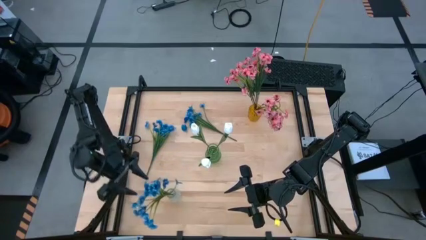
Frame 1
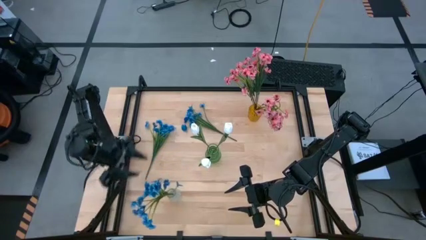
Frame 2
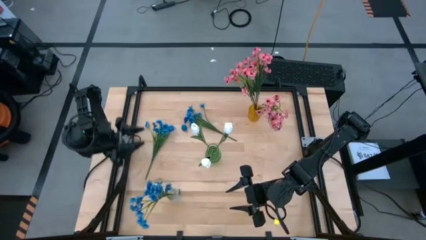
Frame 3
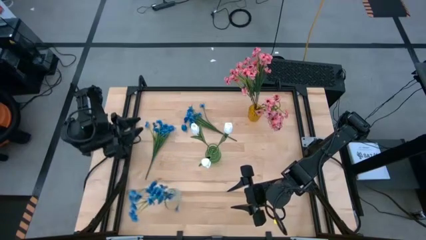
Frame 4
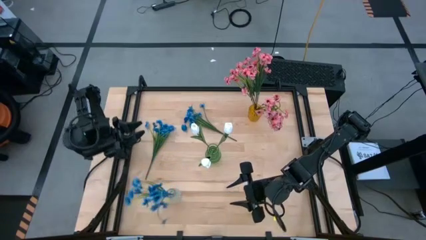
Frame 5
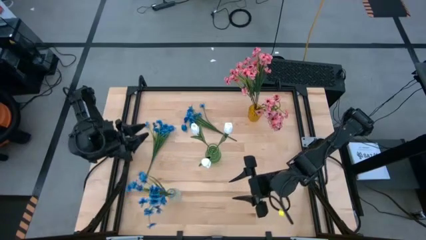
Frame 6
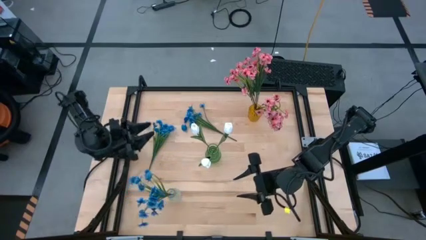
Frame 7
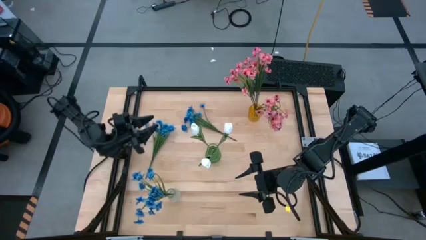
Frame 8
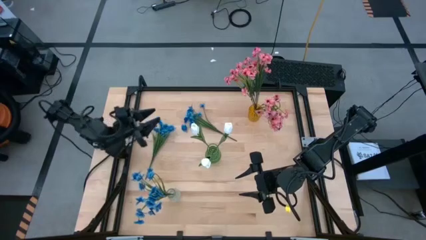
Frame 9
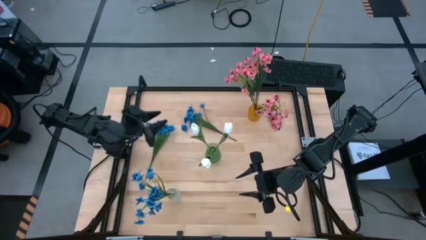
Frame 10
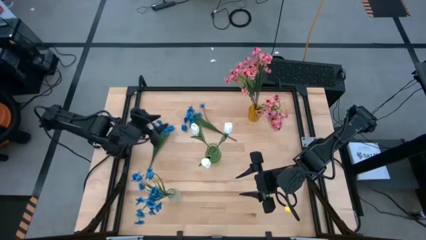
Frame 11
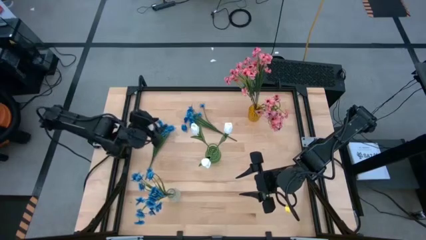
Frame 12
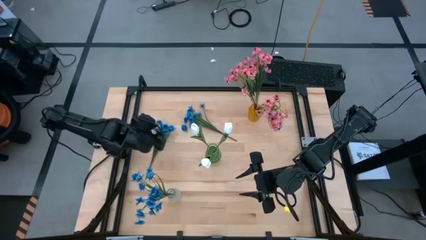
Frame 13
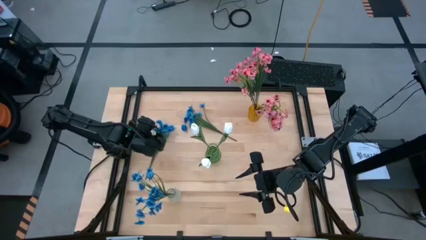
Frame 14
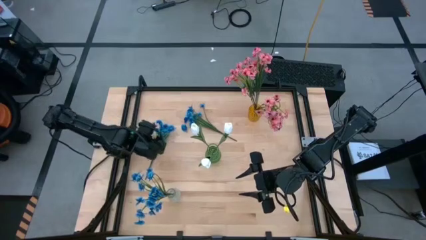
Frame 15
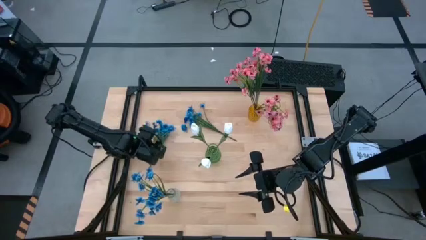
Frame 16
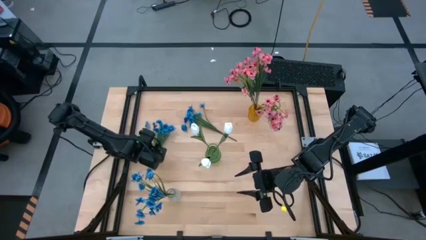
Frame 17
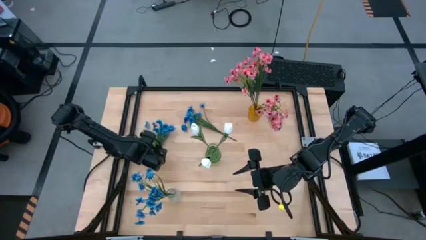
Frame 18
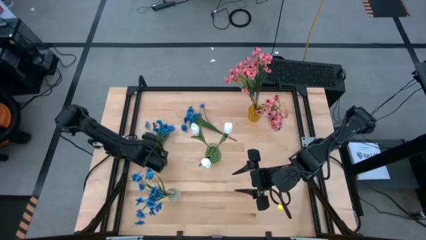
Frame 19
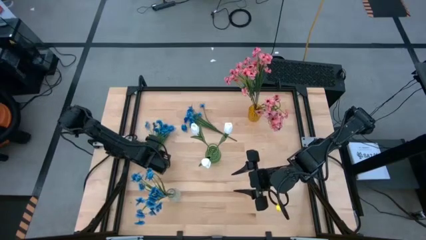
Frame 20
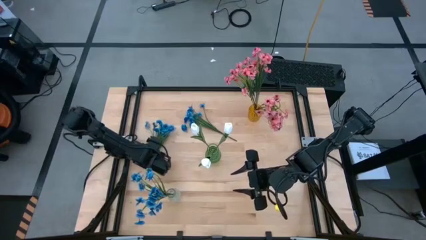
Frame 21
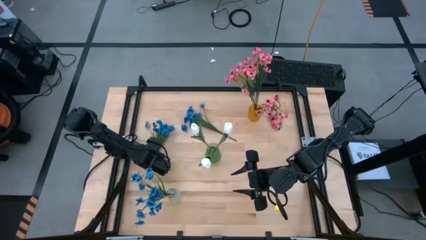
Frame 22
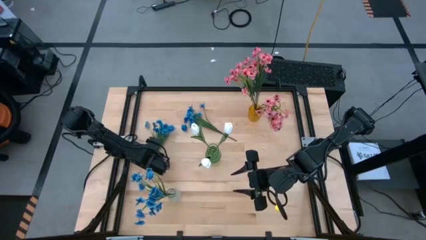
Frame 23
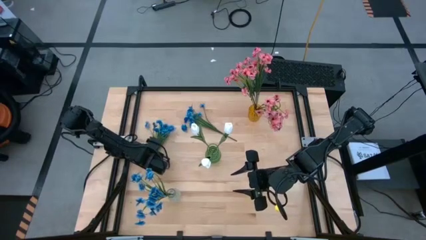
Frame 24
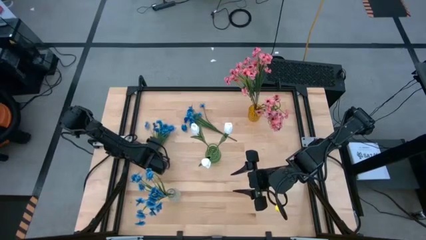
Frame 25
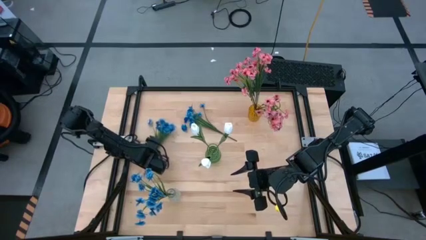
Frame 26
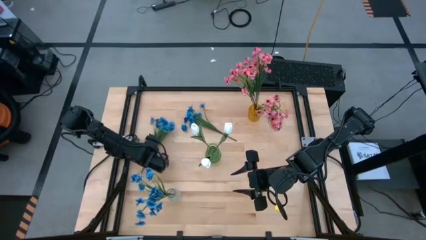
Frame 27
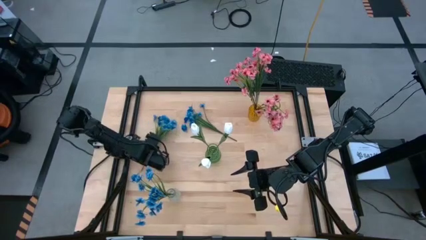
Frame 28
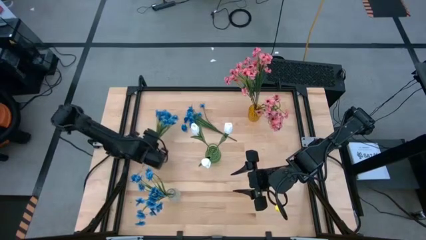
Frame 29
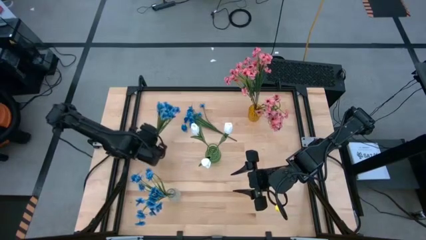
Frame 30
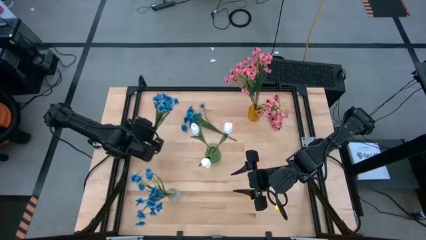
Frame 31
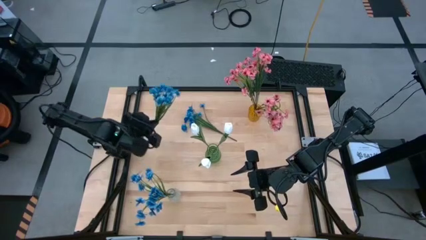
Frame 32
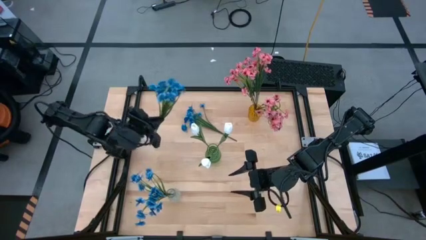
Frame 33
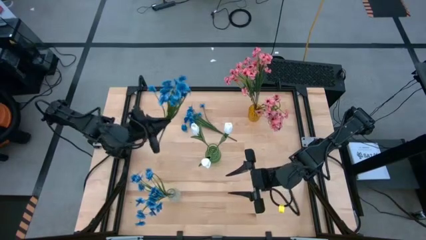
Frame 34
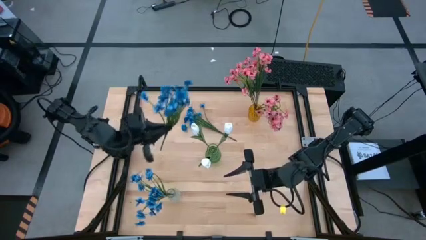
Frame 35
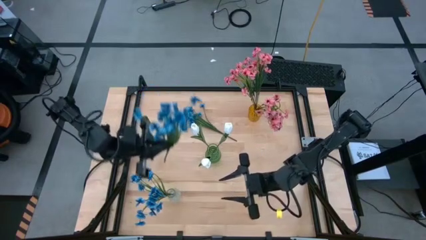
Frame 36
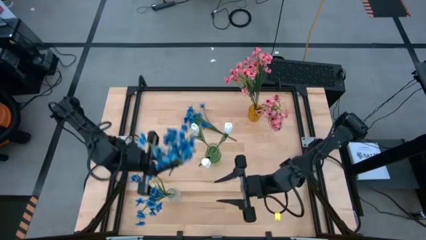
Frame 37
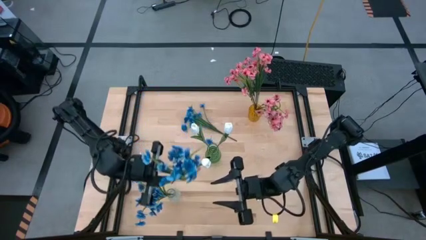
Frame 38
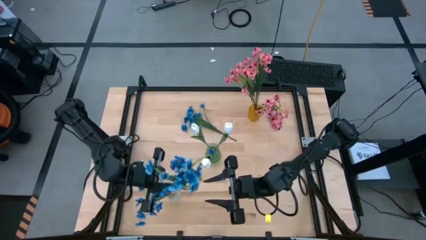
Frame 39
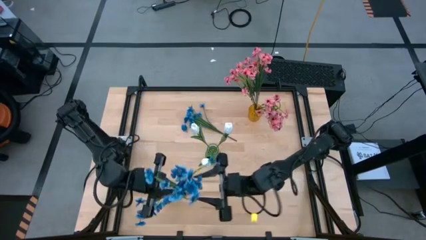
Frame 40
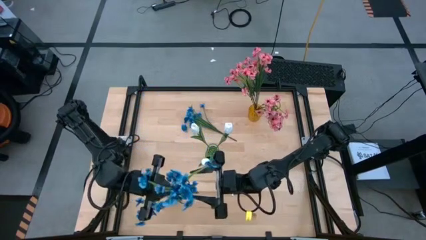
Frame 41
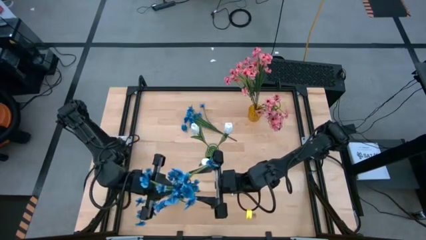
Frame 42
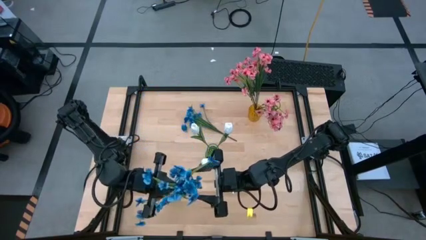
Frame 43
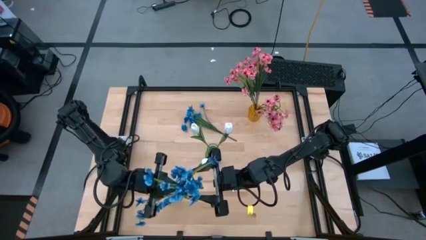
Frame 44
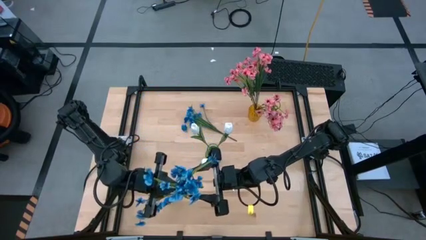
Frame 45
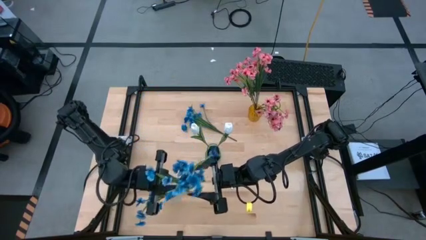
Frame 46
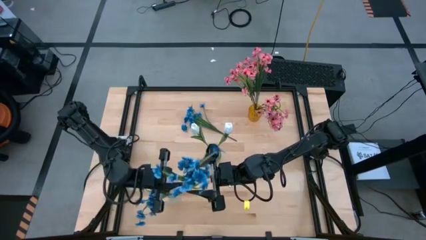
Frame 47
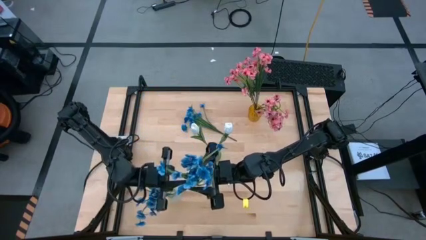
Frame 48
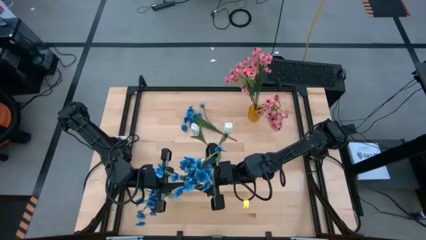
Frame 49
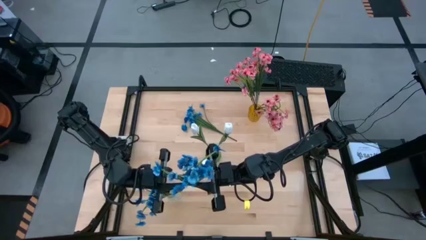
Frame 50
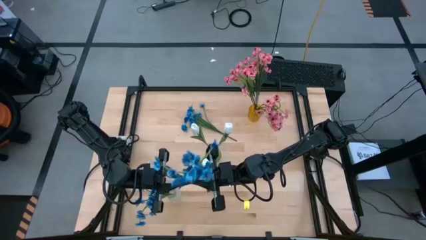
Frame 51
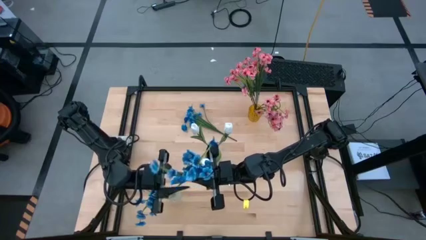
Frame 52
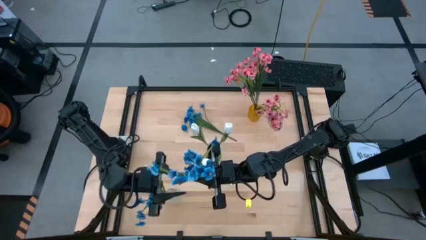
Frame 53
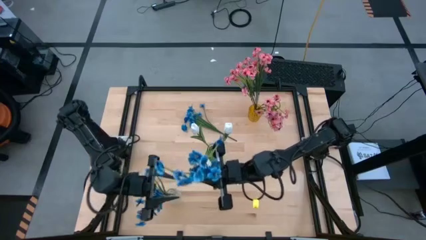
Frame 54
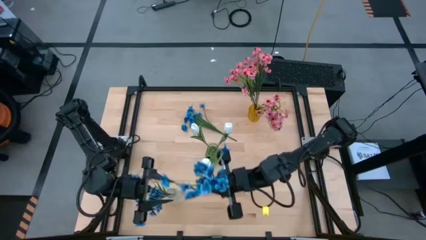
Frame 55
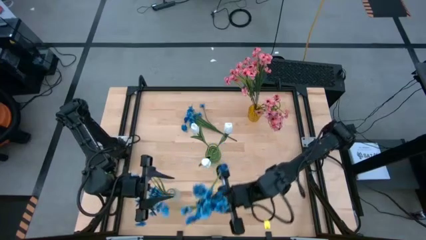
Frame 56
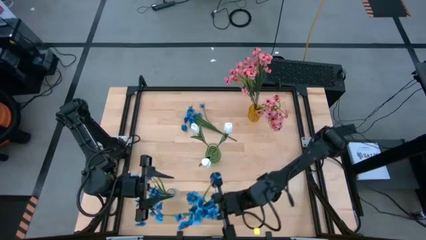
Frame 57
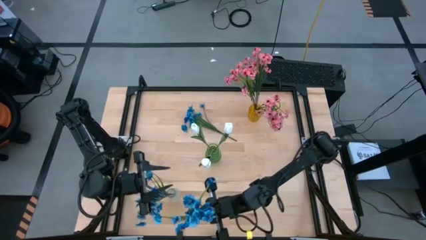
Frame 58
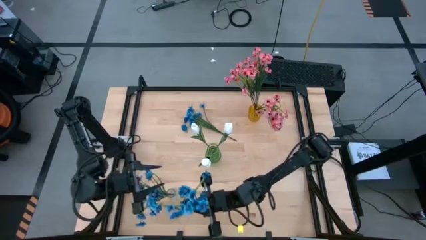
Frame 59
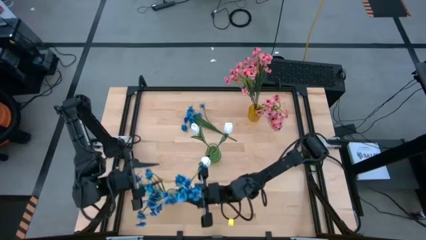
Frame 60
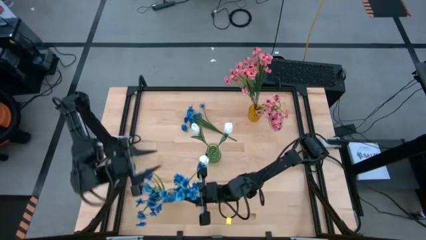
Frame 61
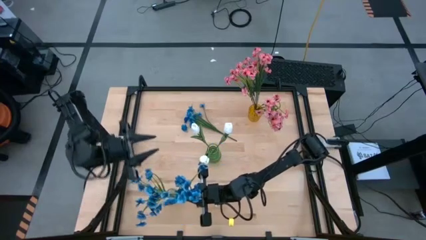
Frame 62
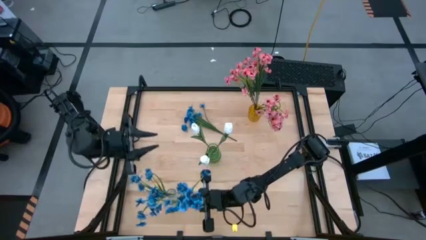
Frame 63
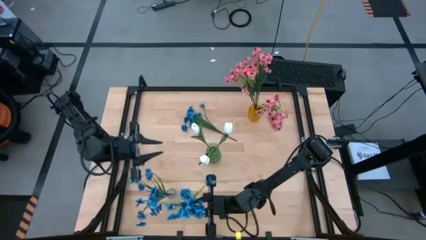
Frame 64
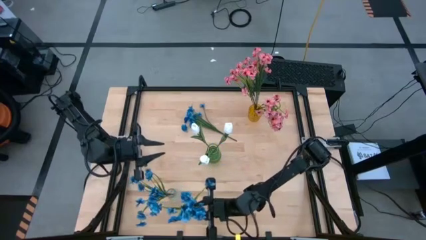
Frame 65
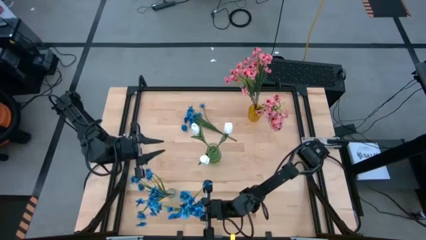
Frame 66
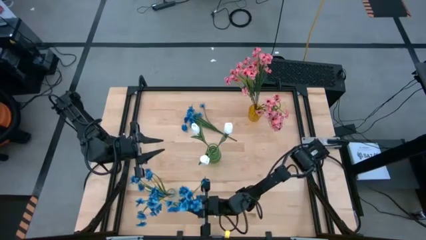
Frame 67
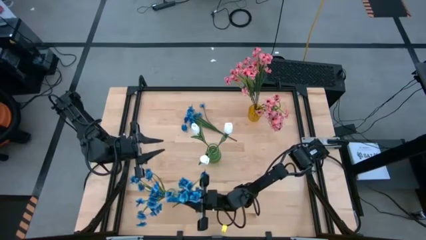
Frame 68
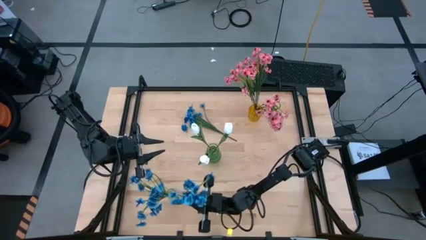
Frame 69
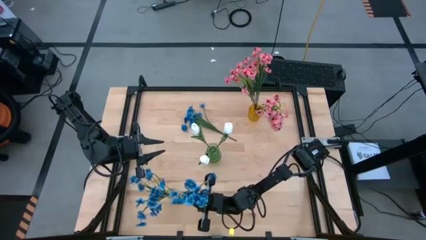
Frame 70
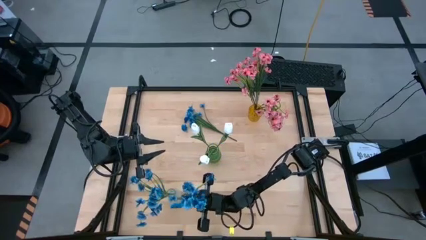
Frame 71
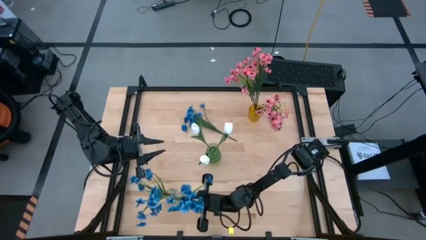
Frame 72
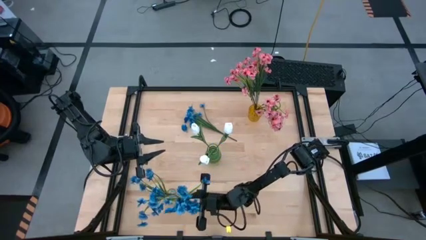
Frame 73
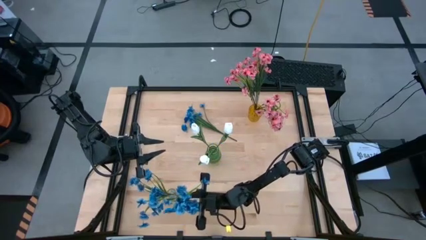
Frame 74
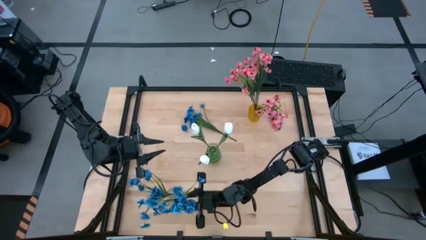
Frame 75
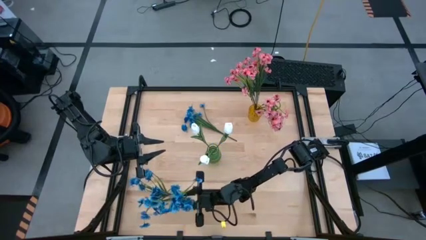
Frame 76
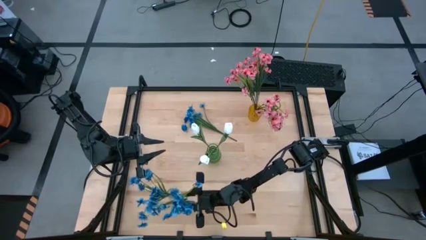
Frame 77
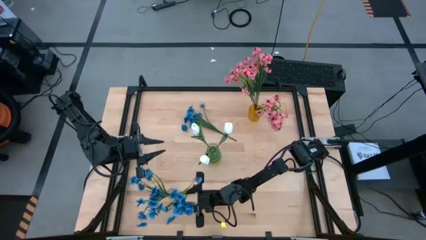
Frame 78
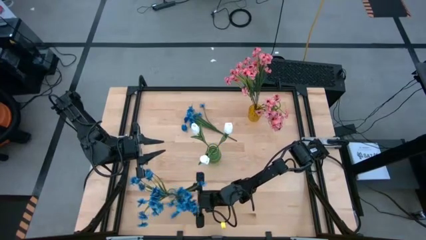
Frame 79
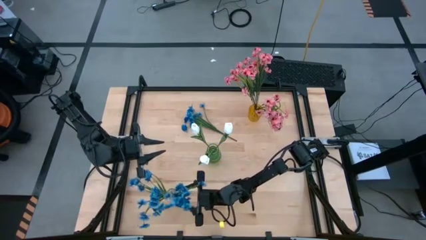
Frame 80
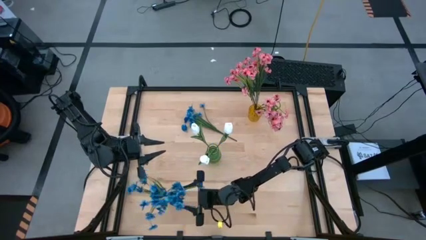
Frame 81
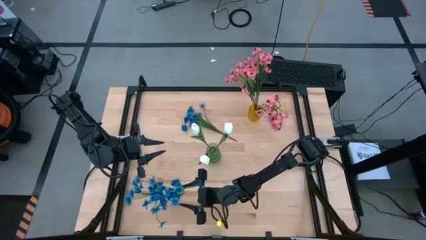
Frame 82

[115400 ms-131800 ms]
Task: Sort flowers into vase by color
Put the left blue flowers into the transparent vase
